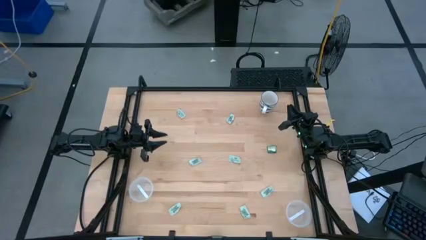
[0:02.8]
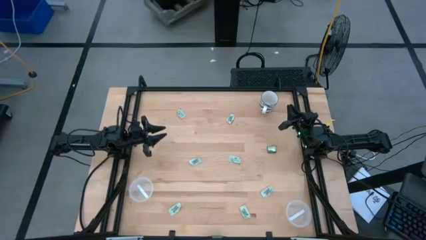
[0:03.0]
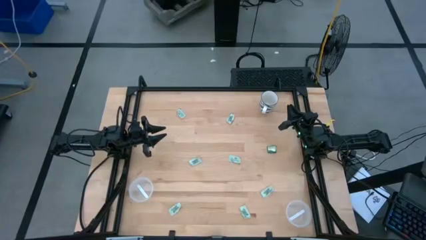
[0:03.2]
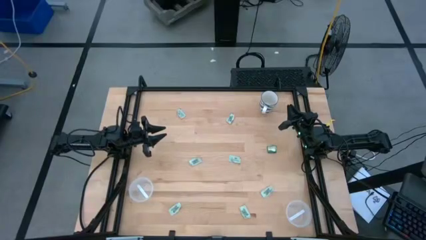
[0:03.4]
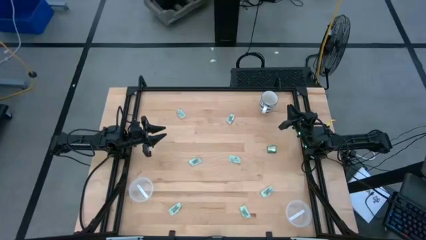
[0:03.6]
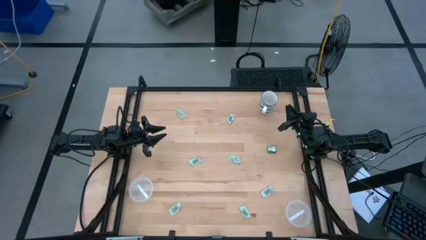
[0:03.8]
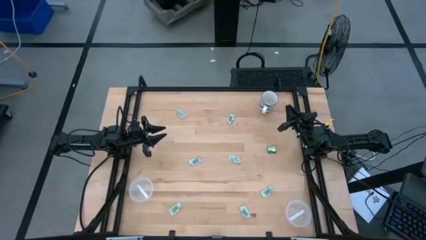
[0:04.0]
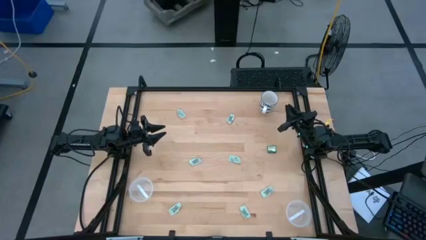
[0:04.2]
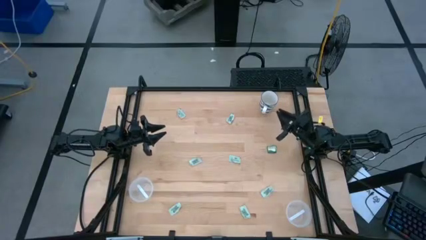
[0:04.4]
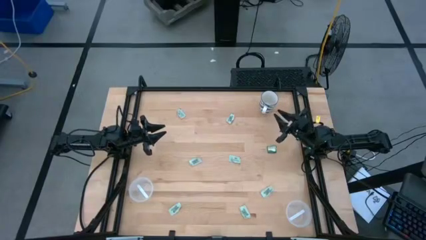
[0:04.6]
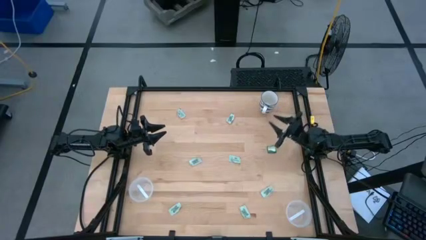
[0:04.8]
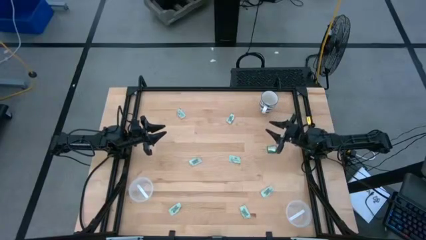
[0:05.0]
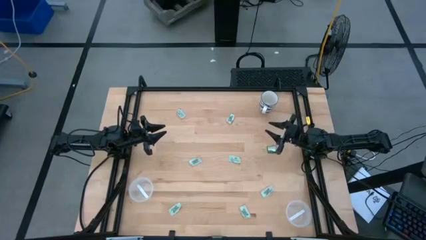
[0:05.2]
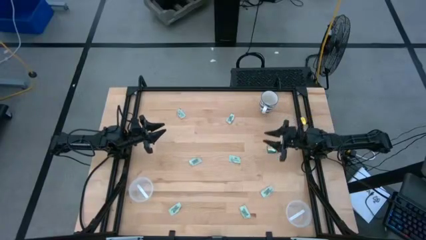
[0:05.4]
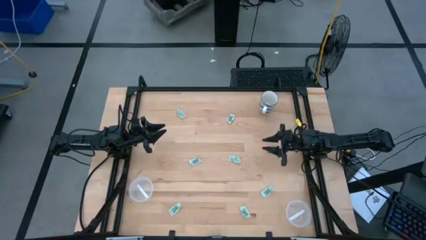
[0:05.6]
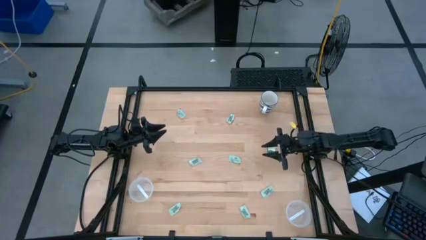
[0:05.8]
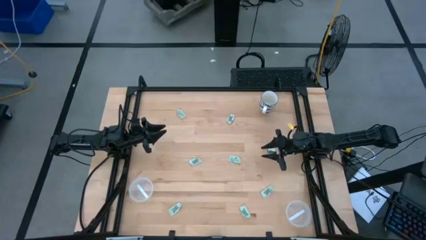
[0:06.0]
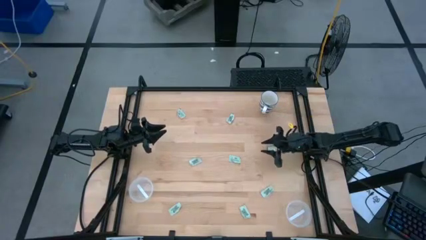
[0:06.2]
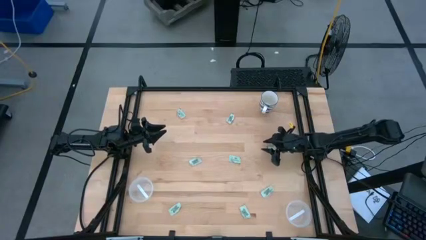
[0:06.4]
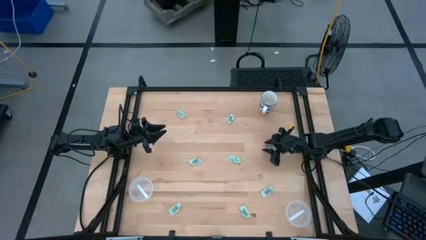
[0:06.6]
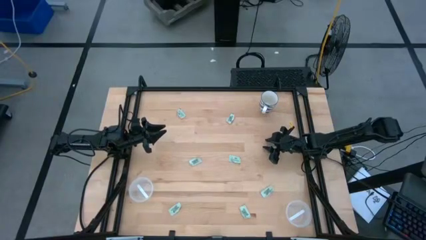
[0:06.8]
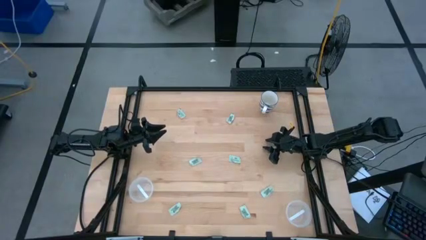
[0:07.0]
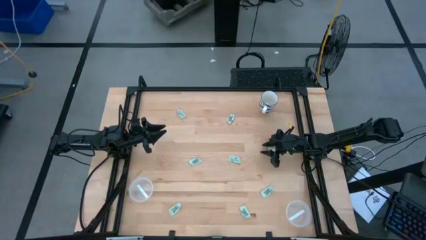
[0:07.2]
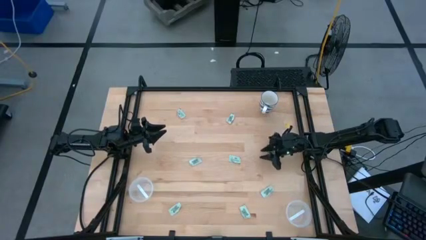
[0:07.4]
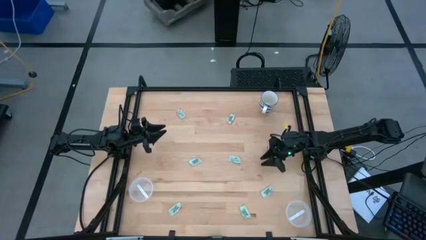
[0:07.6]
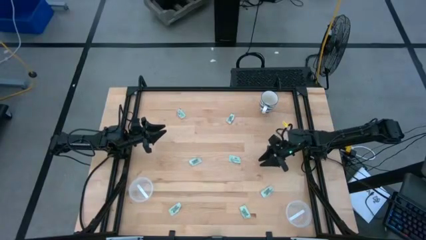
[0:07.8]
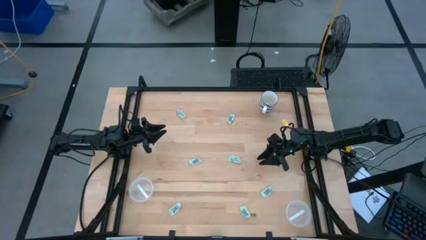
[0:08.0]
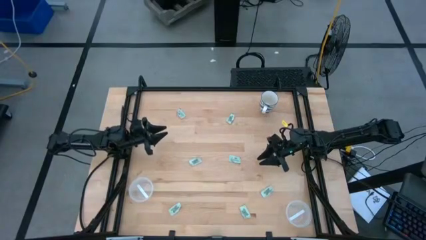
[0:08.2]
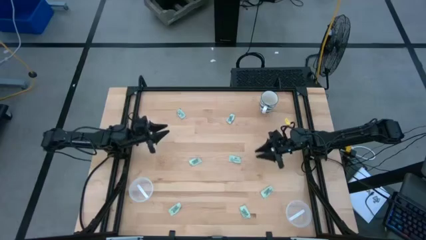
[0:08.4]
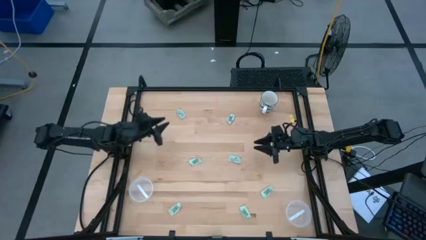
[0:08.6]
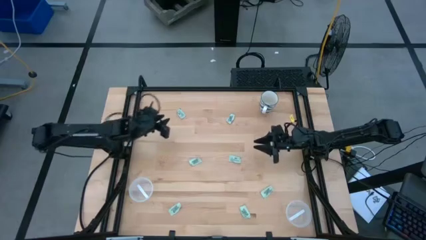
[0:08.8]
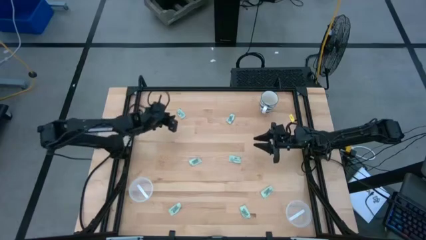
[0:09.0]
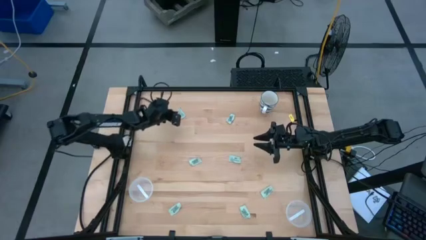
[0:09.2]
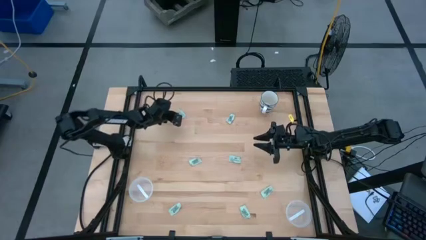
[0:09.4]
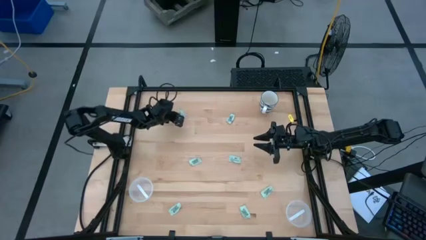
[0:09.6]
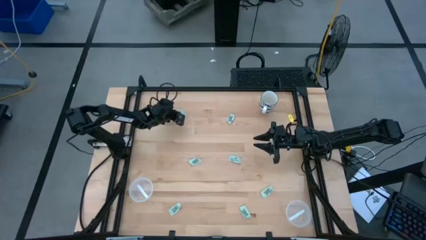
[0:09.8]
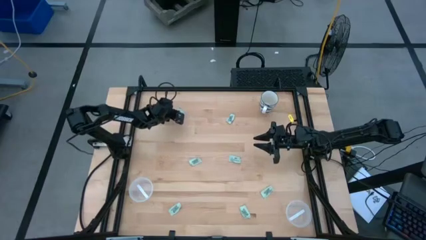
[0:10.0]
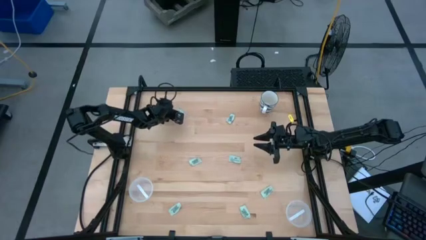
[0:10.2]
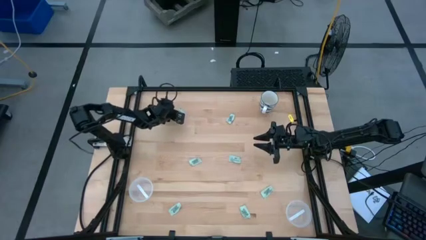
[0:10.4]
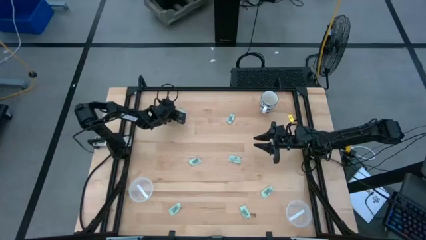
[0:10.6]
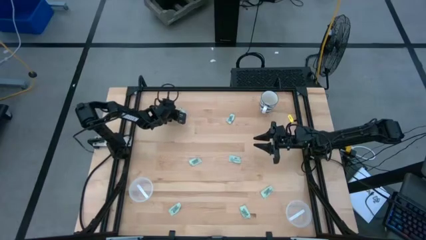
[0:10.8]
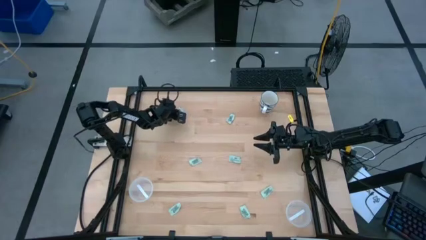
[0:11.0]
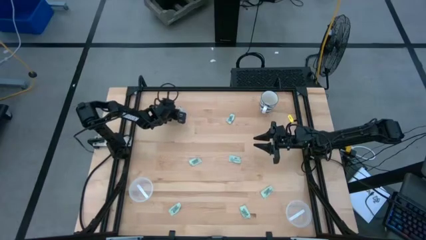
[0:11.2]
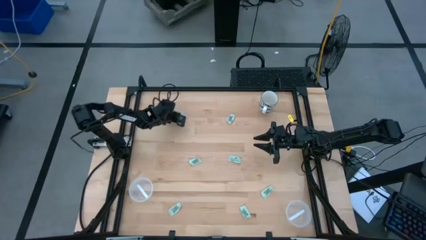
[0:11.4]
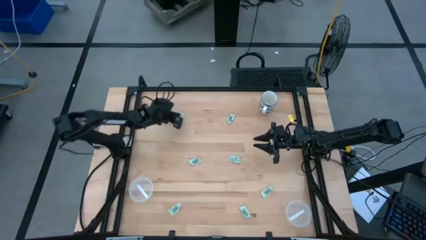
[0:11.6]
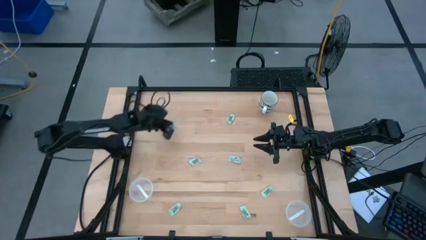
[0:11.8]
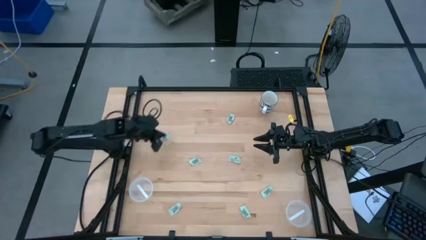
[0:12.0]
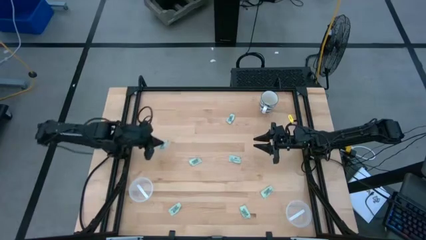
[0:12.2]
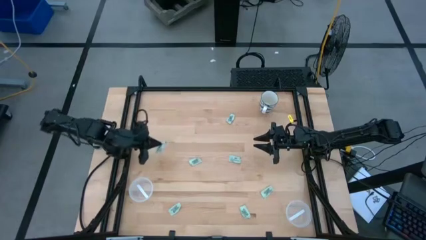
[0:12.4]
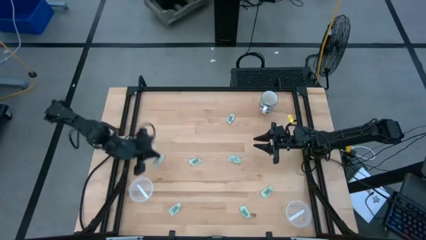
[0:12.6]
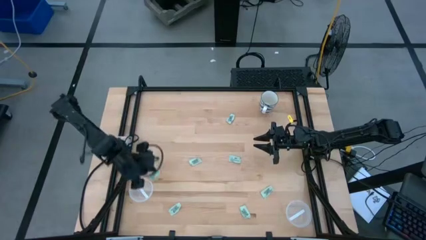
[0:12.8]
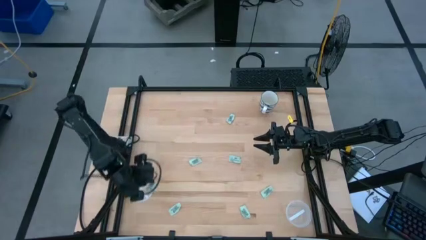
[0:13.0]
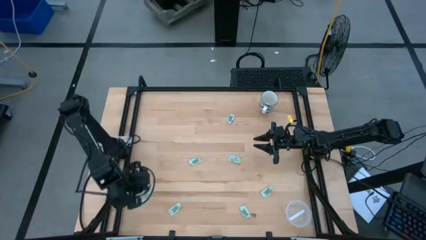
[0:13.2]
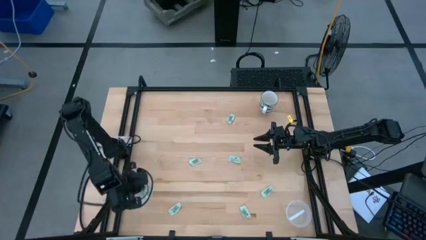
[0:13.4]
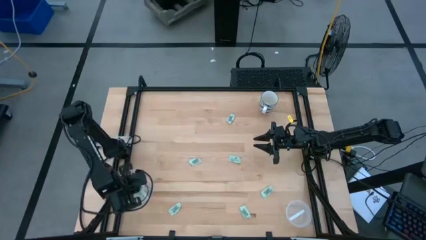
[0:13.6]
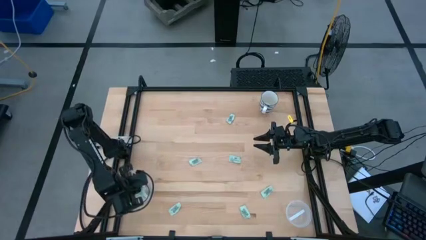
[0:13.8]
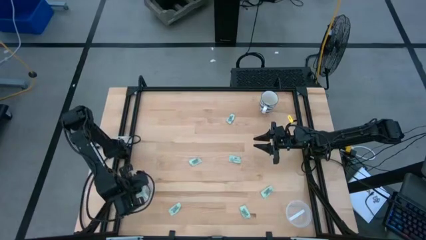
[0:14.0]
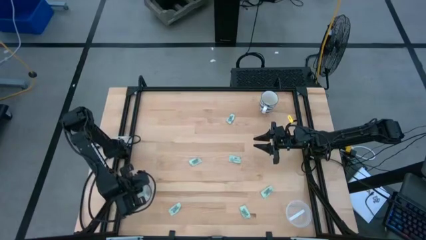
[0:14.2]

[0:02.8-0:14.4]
Task: Pick and place Stevia / Truvia into bins
Put the stevia packet into the top transparent container

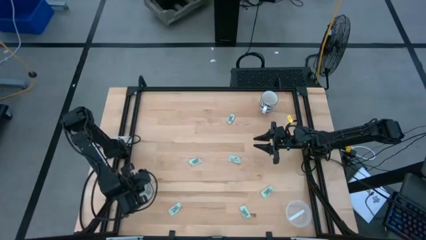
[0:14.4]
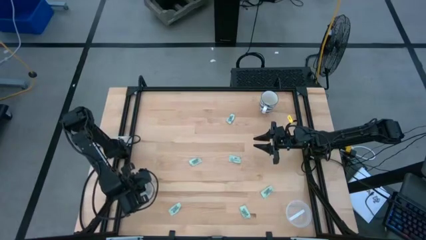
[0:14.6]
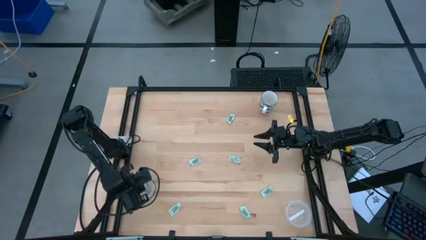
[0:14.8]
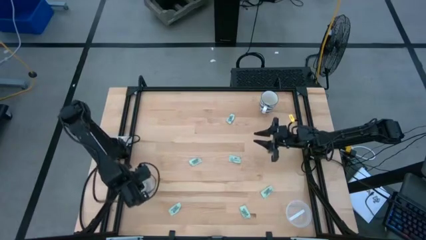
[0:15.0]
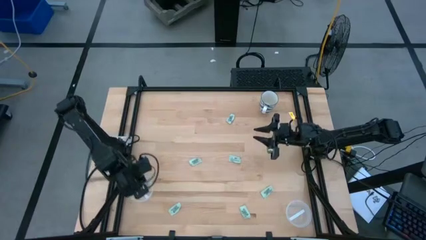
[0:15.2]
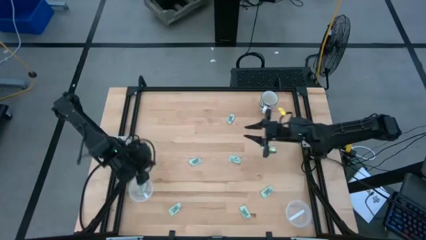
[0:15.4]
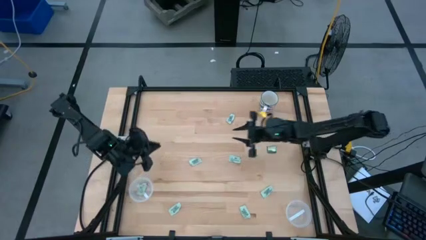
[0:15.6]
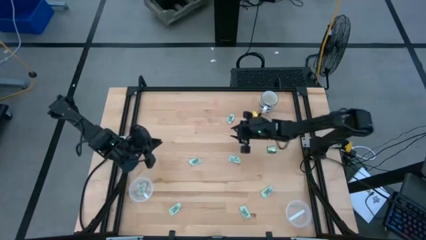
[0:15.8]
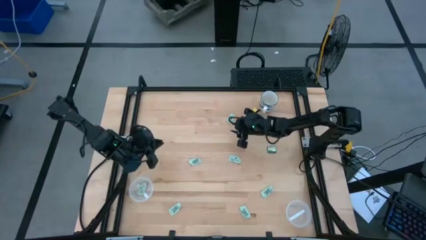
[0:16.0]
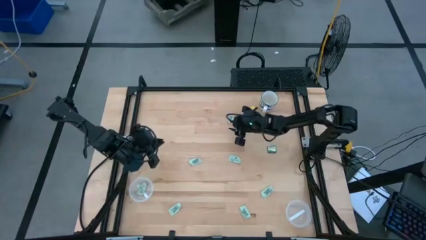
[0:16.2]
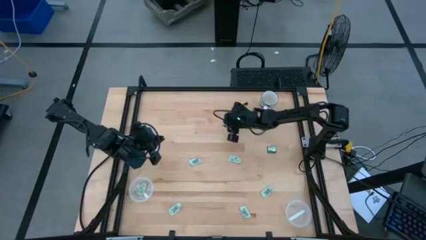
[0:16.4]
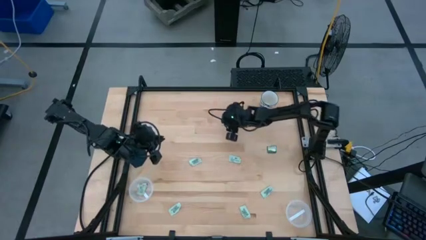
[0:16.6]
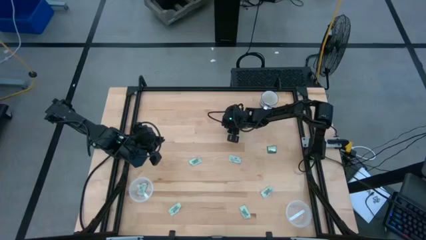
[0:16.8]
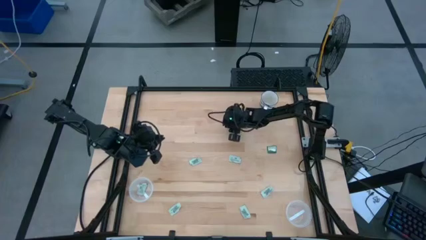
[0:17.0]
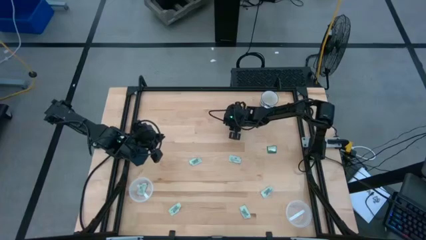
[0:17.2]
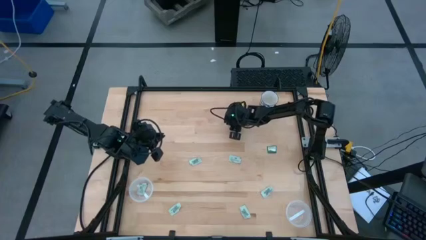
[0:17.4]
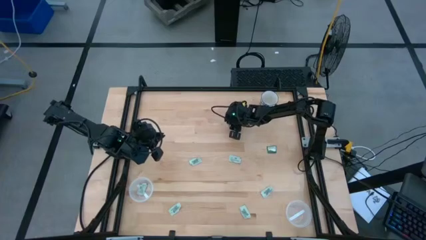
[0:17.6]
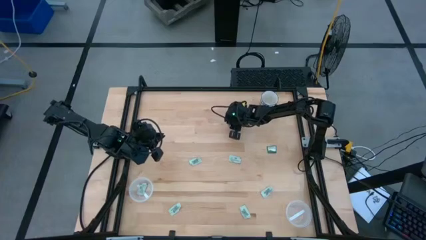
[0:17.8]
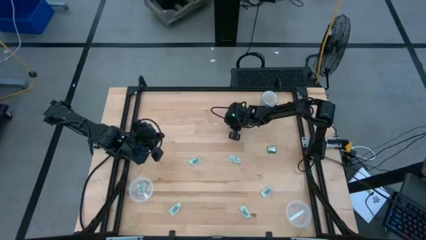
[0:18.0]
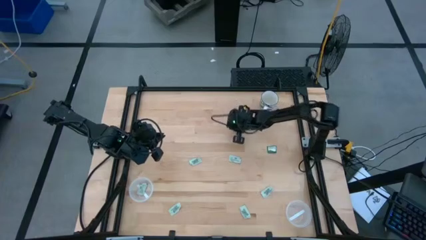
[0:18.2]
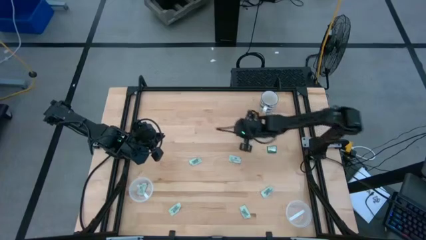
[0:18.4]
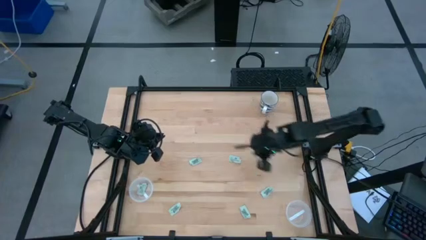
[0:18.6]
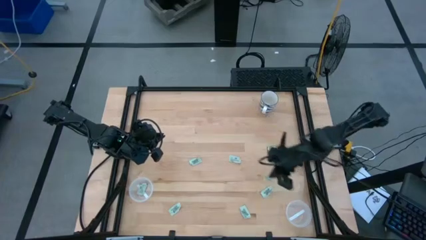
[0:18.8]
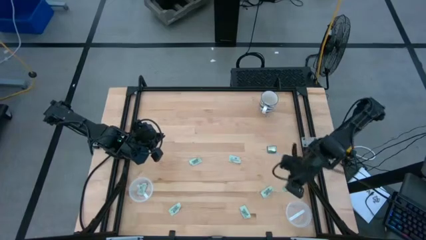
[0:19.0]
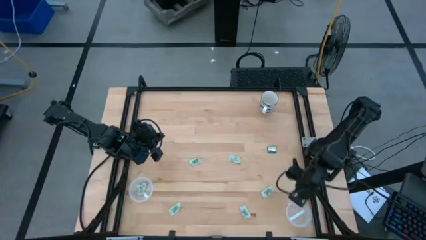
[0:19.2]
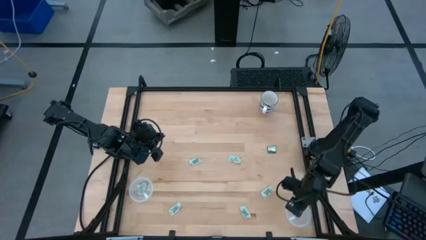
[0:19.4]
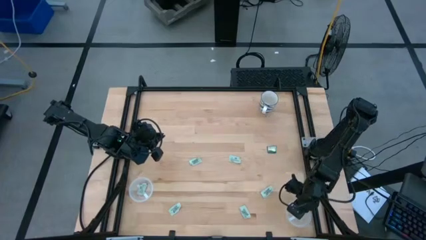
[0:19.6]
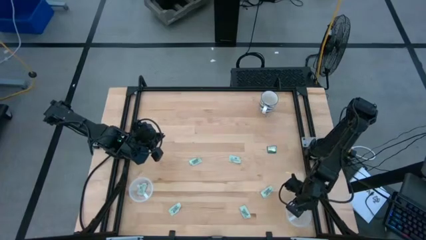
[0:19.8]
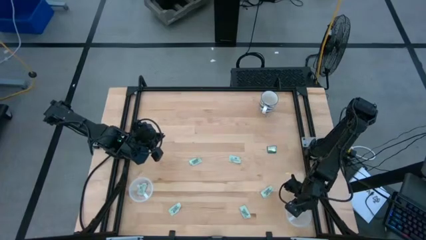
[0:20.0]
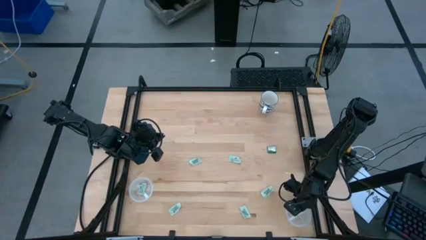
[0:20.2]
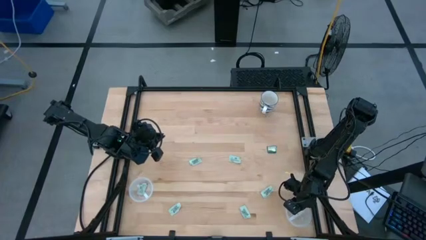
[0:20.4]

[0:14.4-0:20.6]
Put the stevia packet into the bottom transparent container
